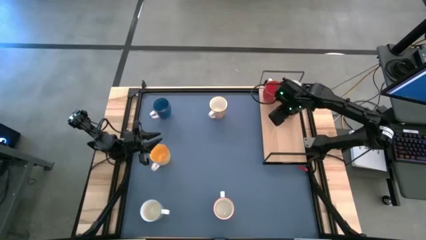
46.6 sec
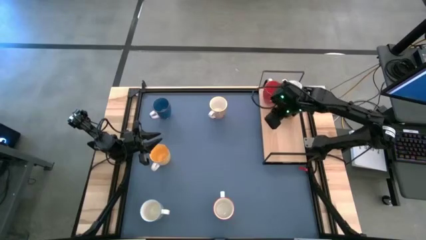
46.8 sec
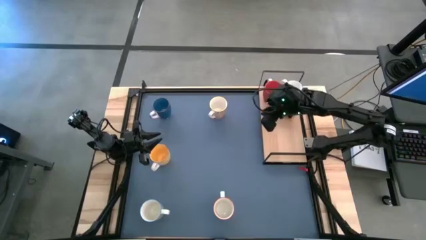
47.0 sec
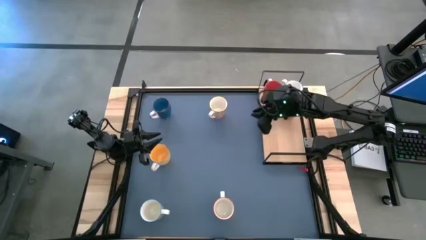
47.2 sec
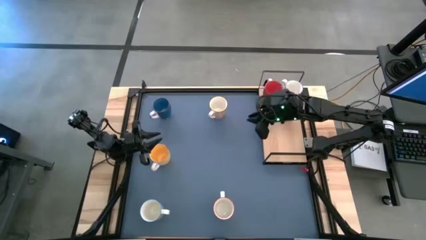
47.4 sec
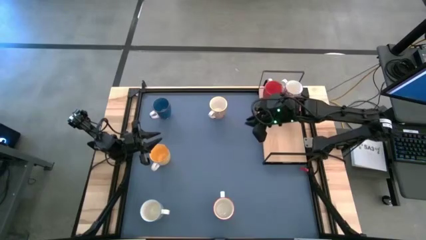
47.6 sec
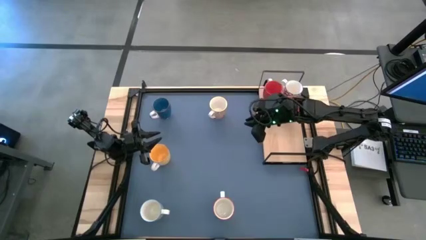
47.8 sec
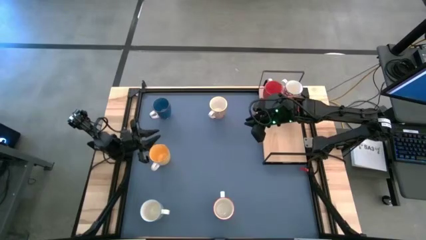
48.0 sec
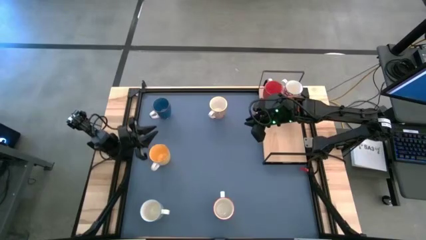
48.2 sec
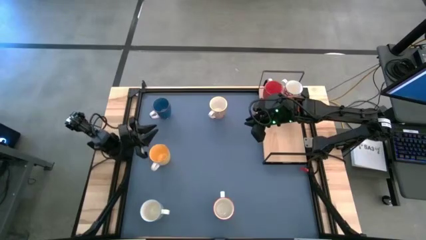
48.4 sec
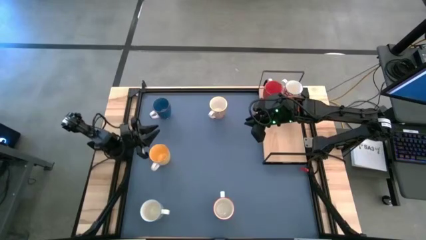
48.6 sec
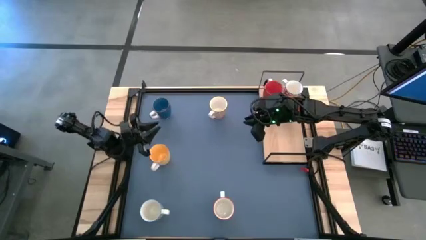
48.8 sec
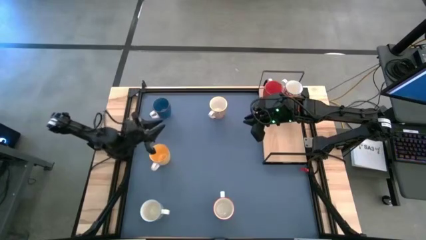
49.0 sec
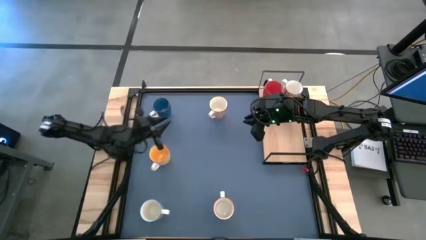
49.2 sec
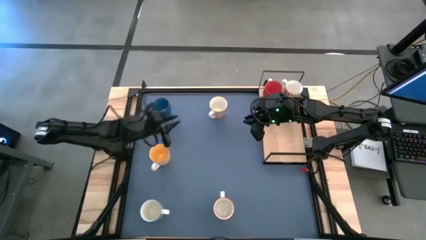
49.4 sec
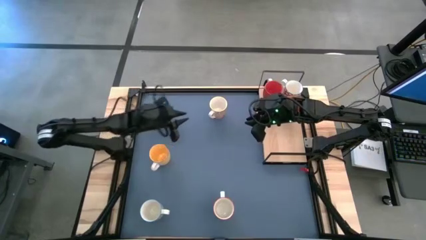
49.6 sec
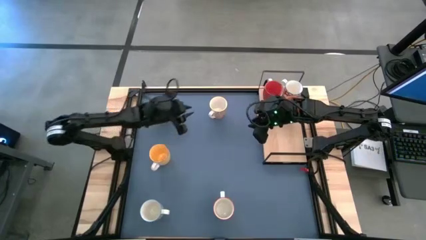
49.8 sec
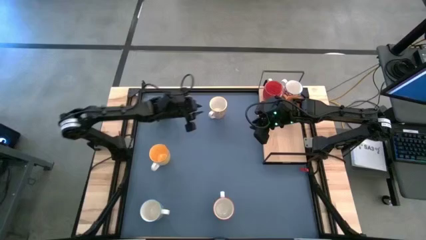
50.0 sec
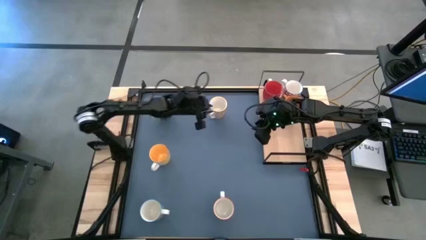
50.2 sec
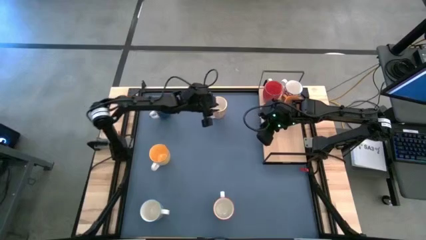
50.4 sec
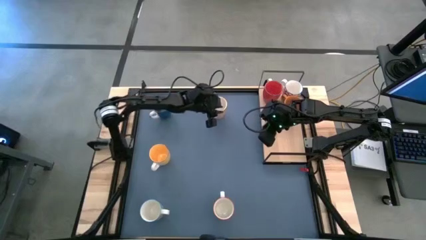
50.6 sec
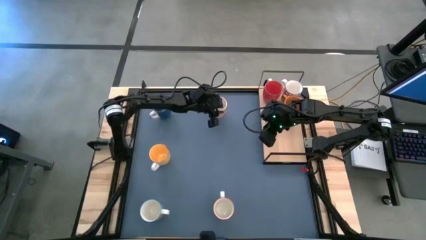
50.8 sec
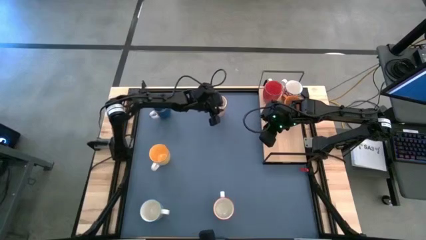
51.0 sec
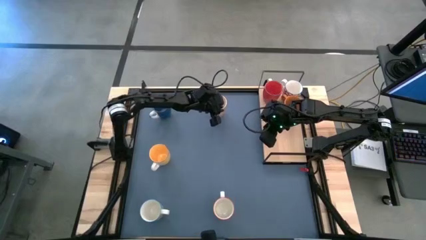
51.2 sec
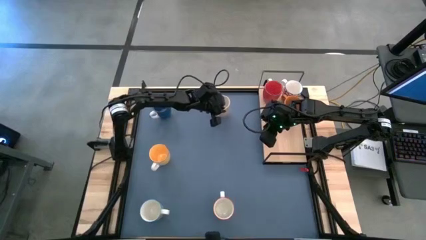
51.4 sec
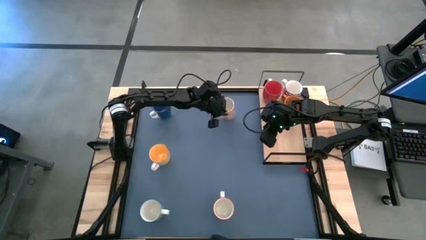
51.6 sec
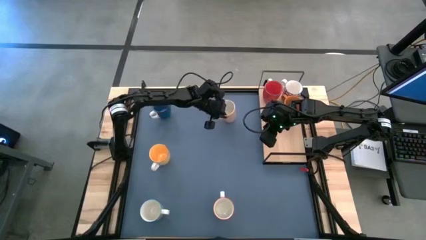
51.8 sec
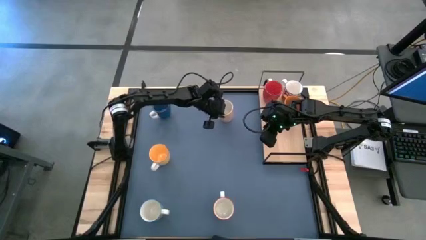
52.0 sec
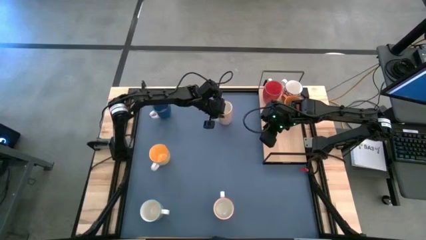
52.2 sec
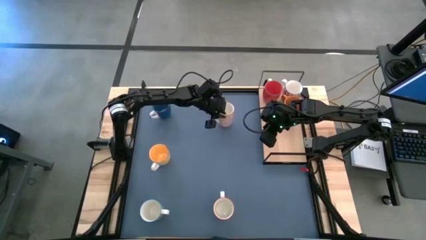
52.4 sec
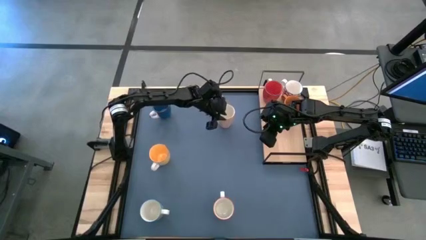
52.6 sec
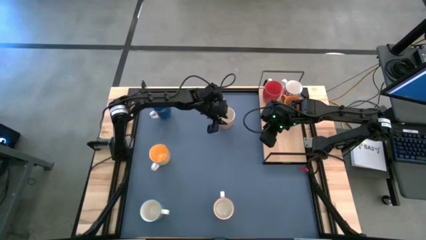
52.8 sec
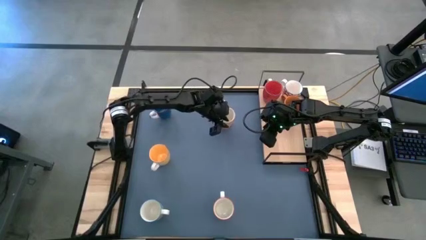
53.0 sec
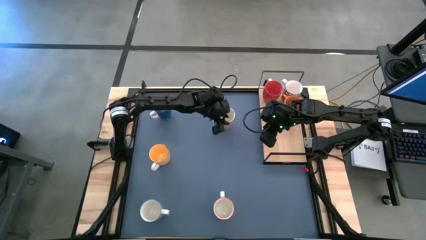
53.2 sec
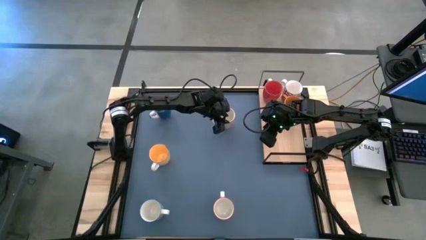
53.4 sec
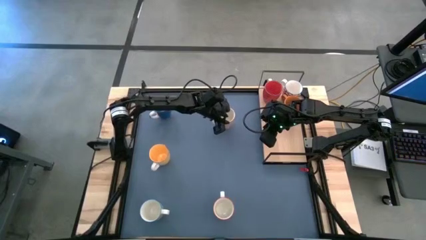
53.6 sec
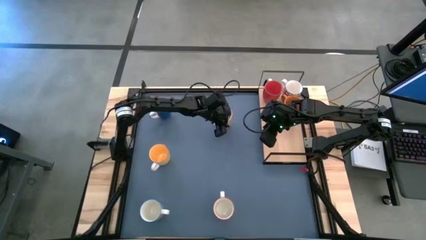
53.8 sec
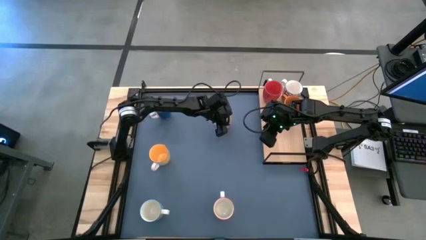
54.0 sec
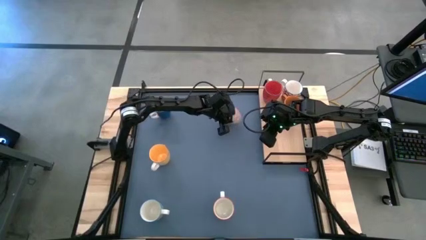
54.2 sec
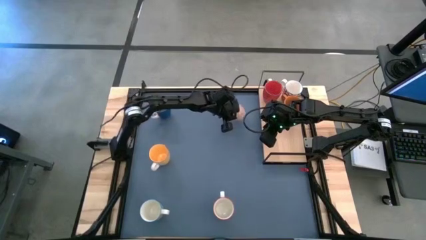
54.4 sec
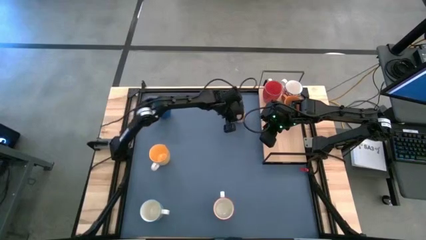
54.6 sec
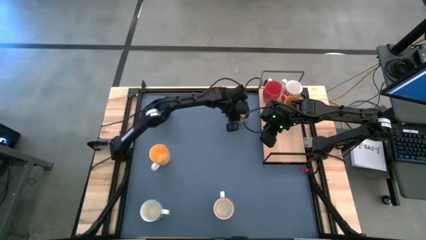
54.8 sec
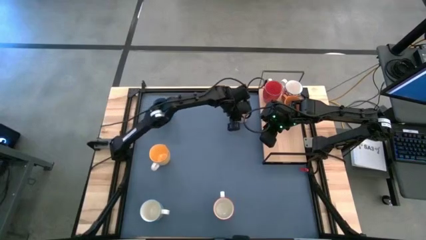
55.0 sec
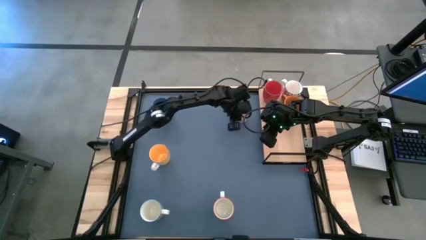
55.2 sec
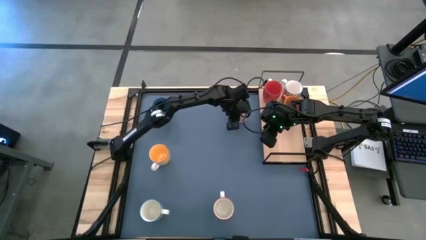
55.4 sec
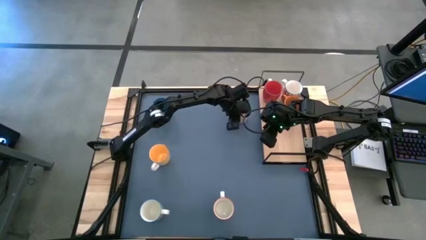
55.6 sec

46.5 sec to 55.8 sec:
Task: Place coffee mugs
Move the orange patterned mug to the top middle

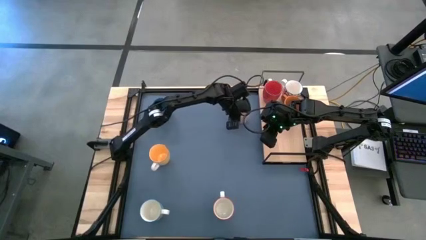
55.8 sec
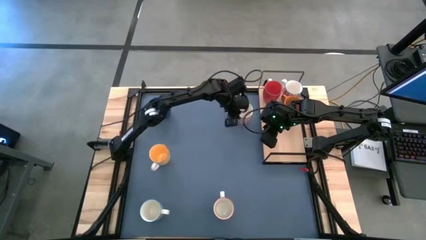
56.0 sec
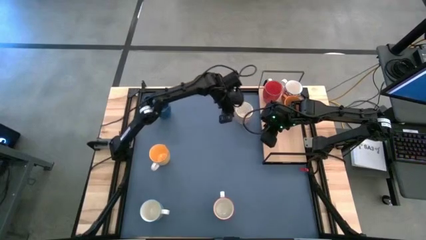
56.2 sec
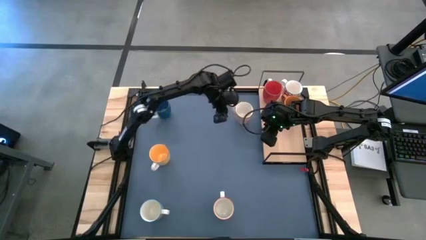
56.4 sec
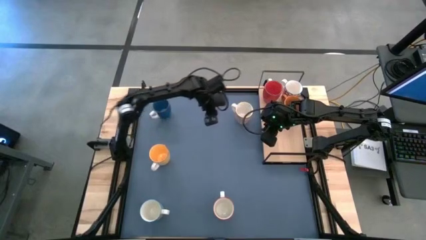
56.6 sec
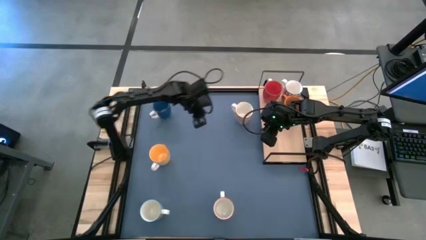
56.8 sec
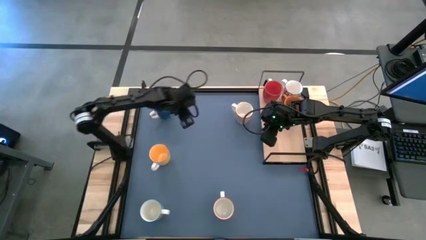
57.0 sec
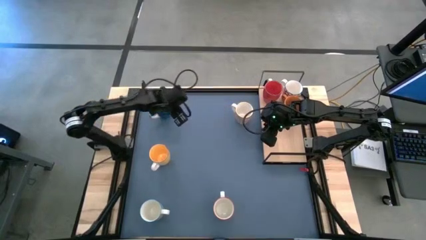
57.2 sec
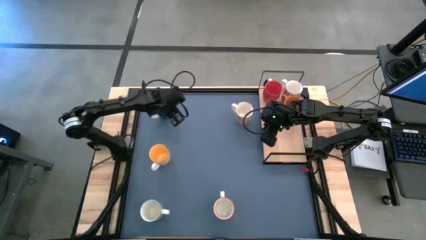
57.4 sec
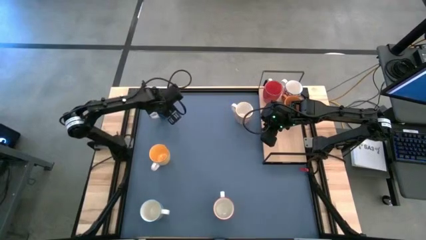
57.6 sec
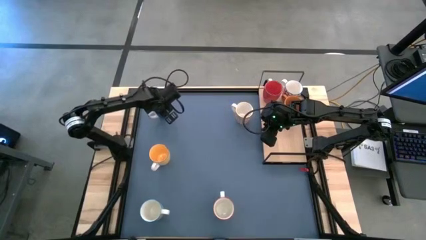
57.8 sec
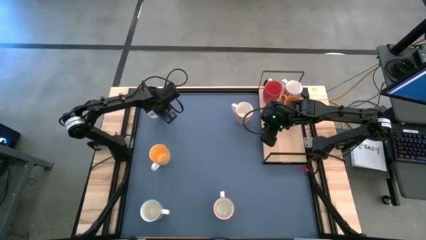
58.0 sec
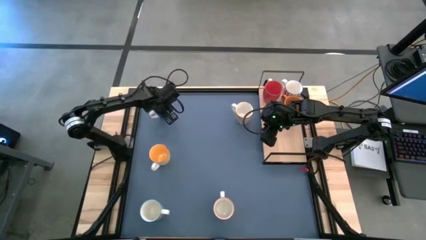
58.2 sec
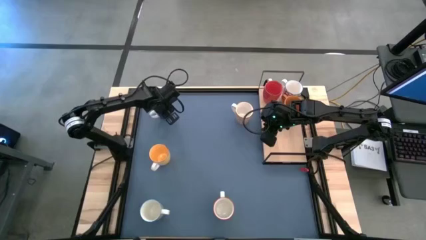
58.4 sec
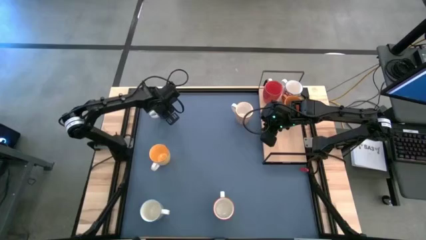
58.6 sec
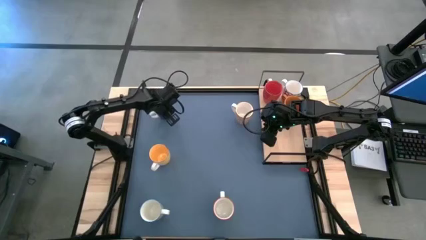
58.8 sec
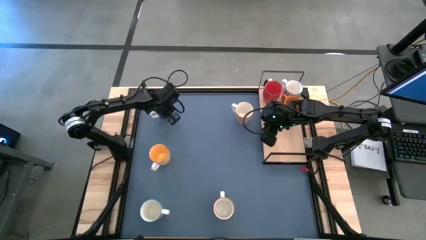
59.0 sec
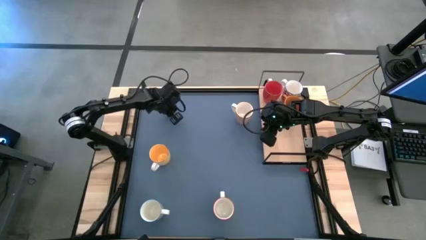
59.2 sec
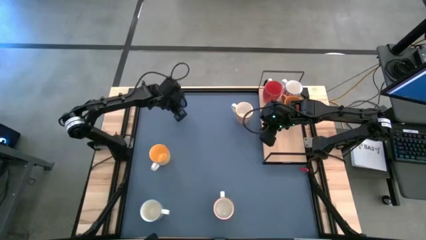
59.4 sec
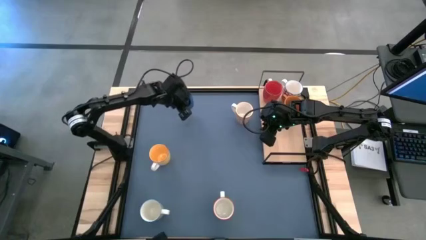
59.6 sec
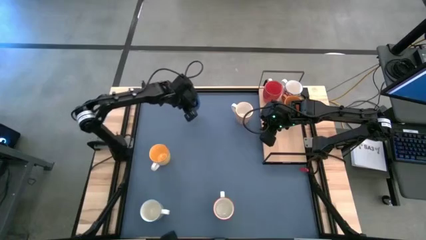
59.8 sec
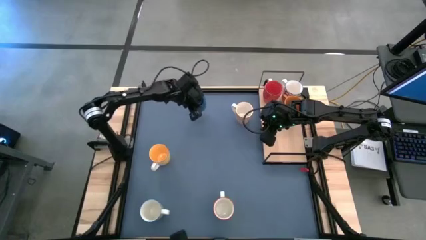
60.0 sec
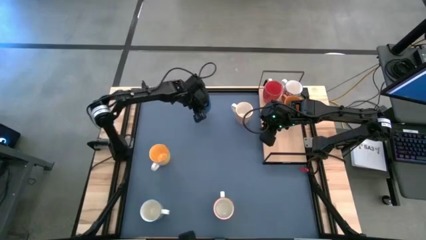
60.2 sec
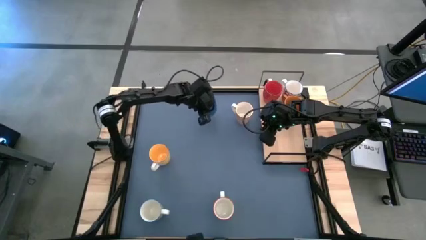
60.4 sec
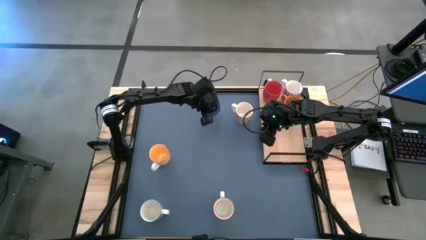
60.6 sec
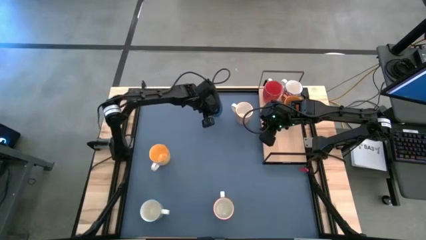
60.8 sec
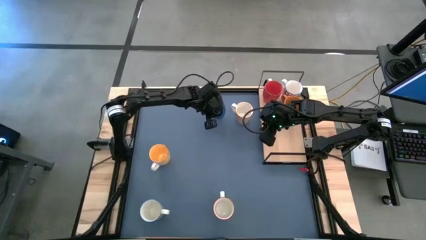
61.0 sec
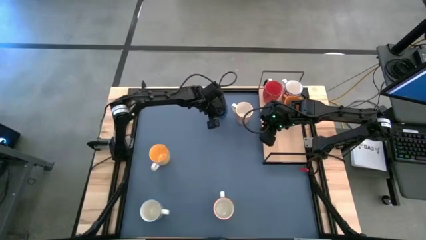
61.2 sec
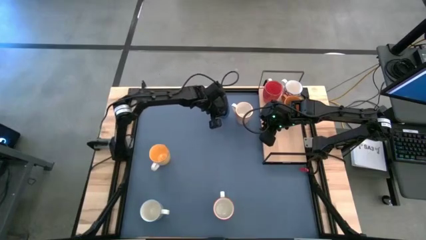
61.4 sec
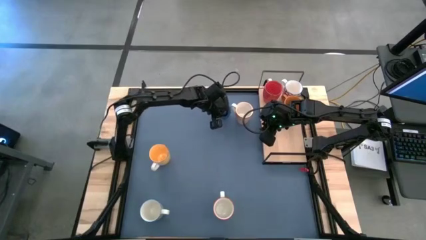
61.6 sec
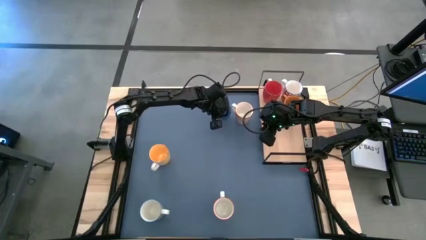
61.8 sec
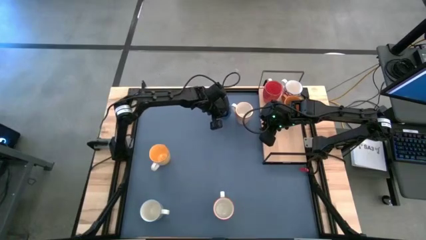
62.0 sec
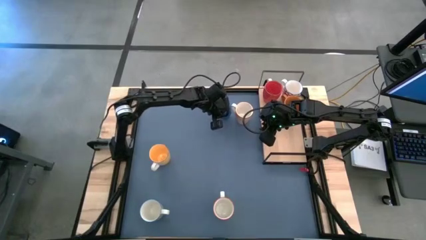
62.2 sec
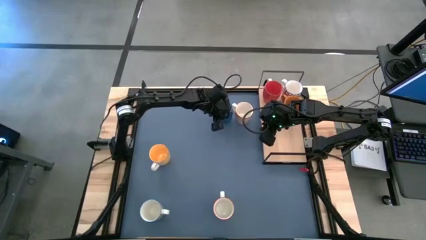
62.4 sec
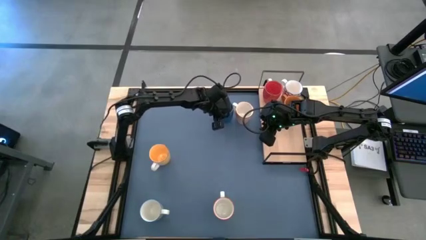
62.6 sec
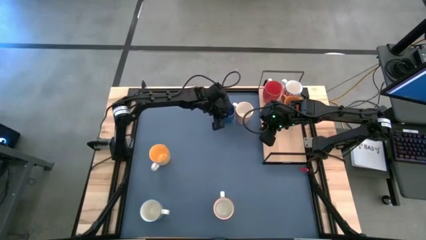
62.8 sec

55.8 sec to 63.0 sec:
Move the blue mug to the top middle
